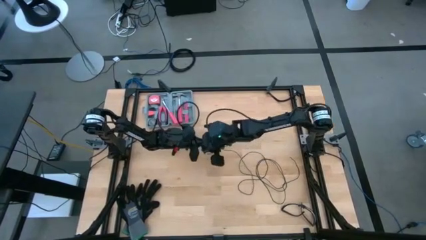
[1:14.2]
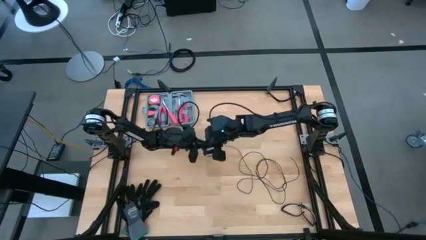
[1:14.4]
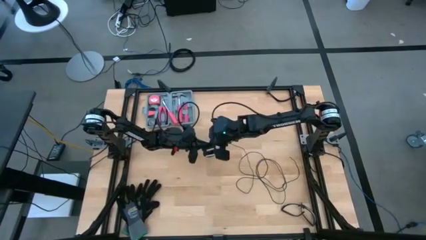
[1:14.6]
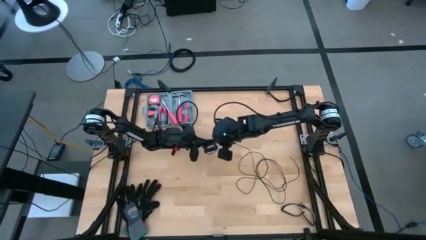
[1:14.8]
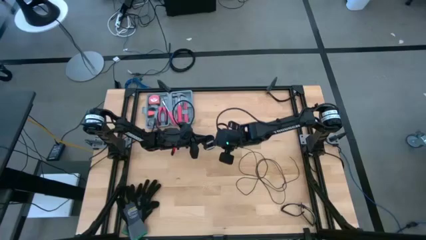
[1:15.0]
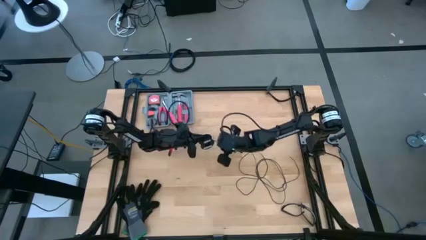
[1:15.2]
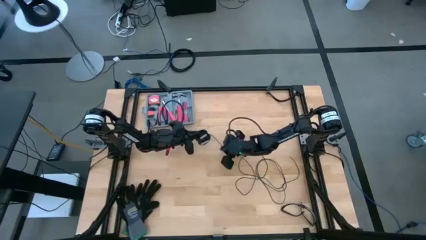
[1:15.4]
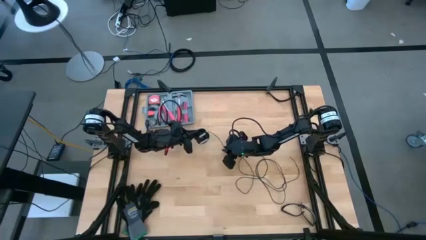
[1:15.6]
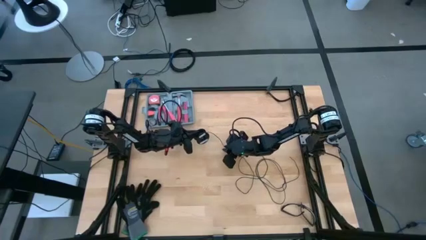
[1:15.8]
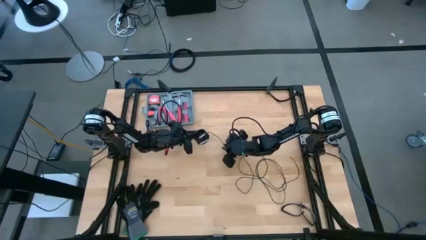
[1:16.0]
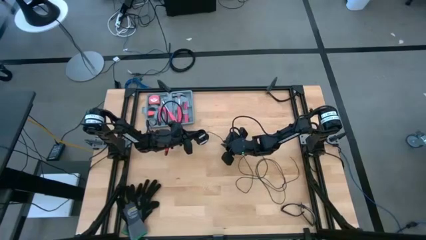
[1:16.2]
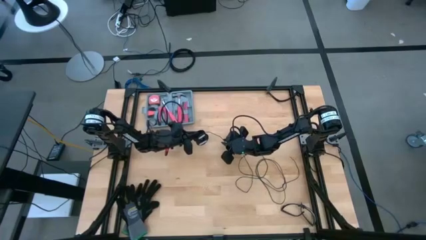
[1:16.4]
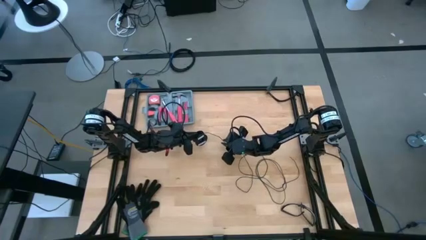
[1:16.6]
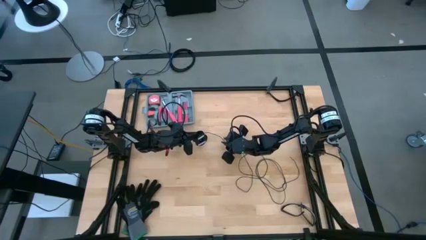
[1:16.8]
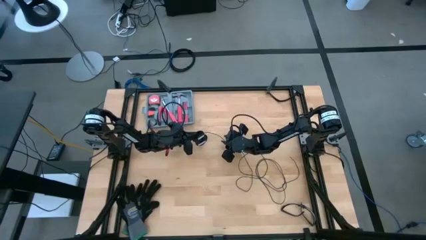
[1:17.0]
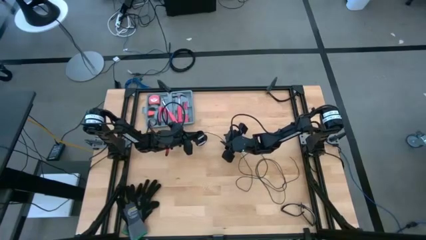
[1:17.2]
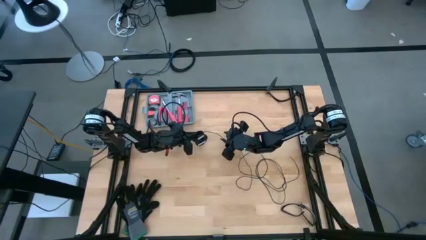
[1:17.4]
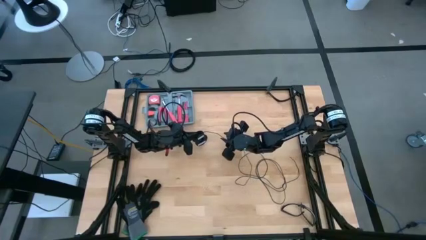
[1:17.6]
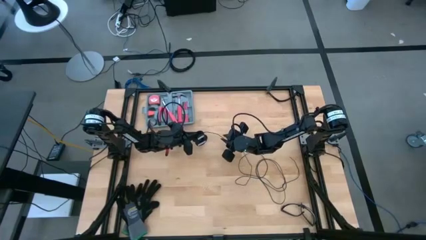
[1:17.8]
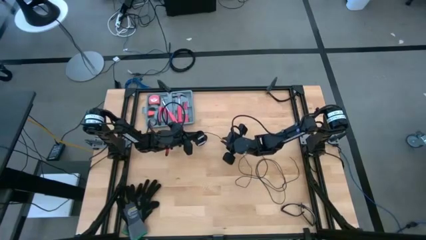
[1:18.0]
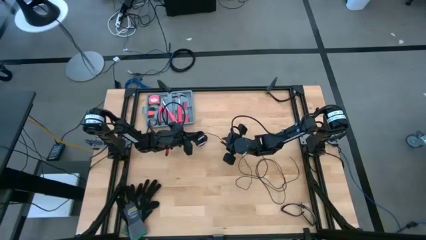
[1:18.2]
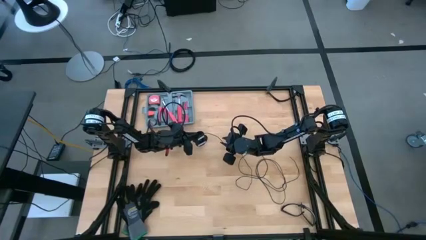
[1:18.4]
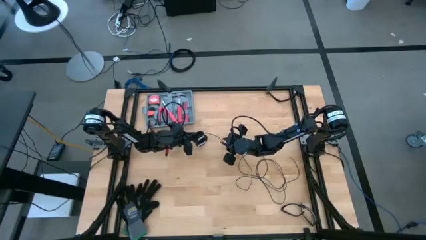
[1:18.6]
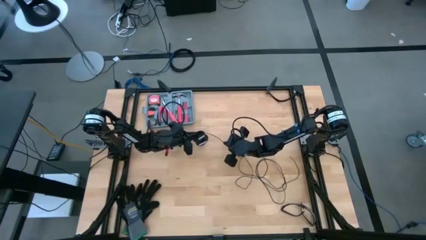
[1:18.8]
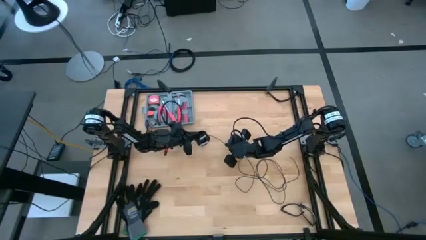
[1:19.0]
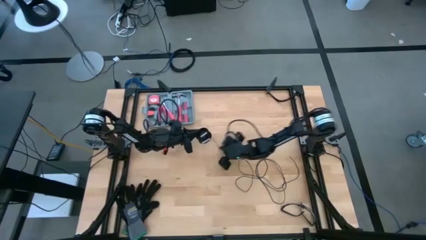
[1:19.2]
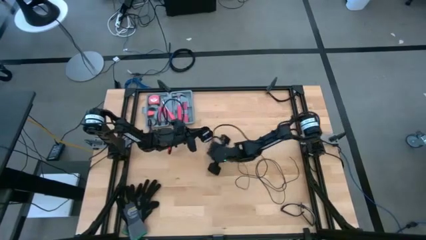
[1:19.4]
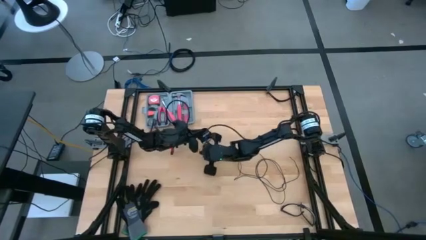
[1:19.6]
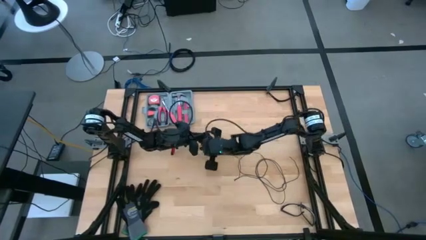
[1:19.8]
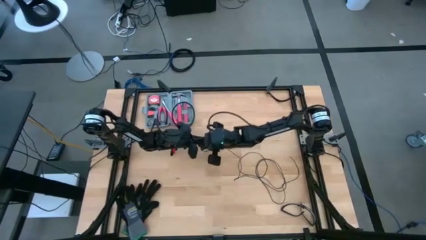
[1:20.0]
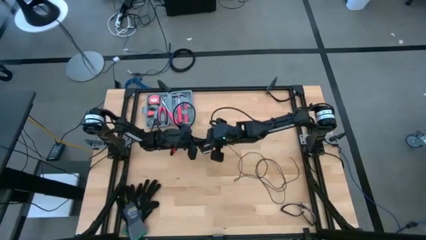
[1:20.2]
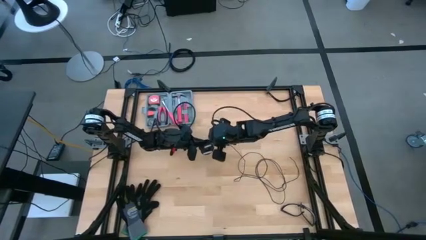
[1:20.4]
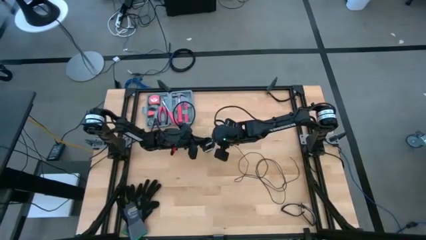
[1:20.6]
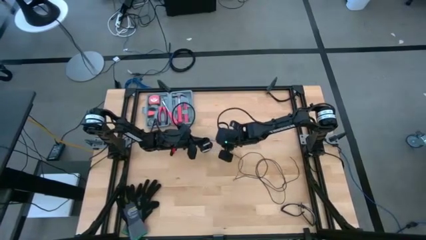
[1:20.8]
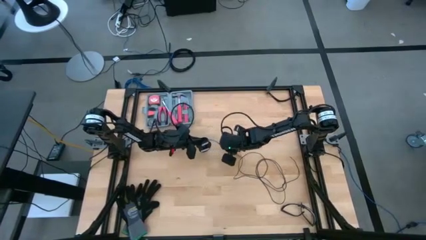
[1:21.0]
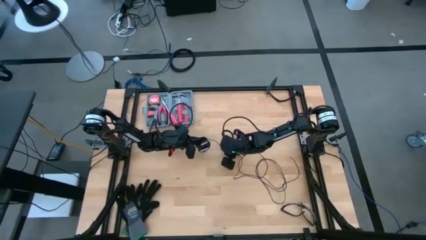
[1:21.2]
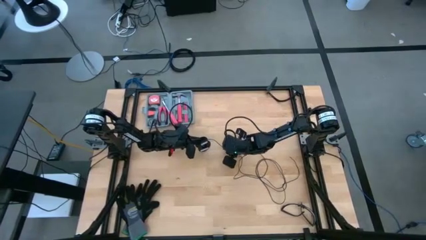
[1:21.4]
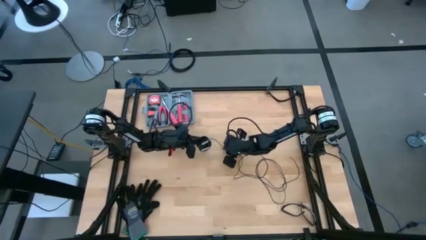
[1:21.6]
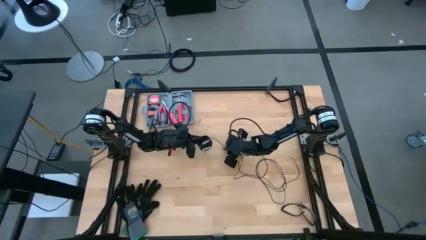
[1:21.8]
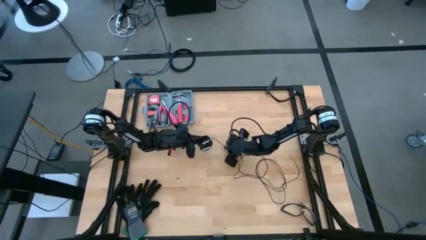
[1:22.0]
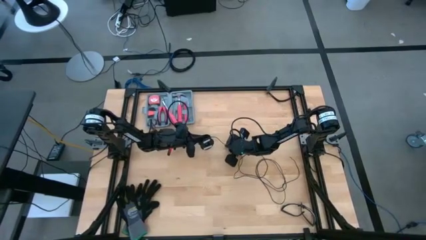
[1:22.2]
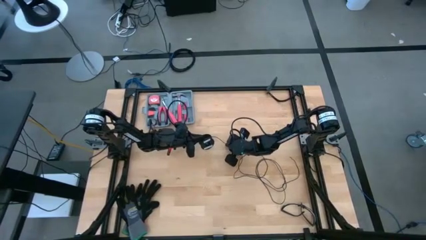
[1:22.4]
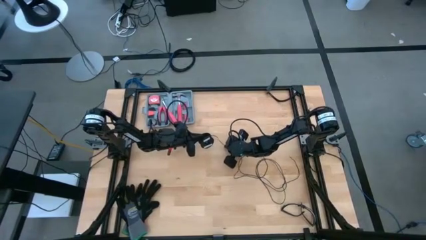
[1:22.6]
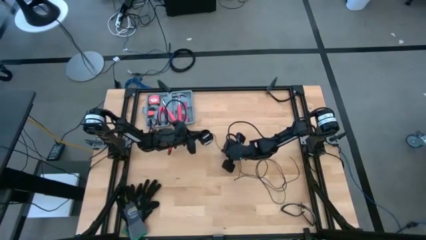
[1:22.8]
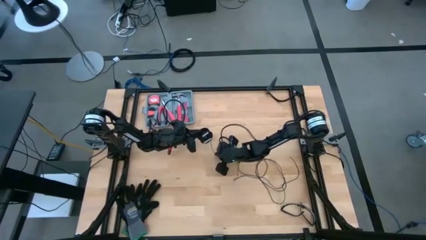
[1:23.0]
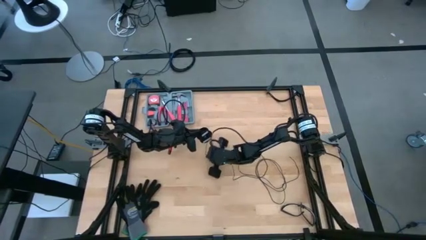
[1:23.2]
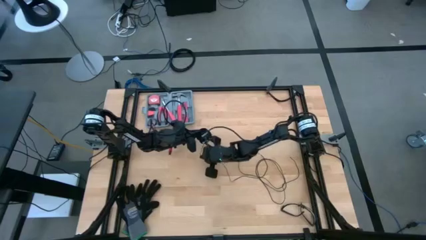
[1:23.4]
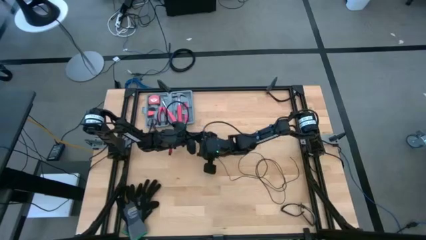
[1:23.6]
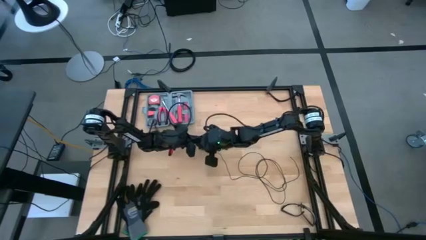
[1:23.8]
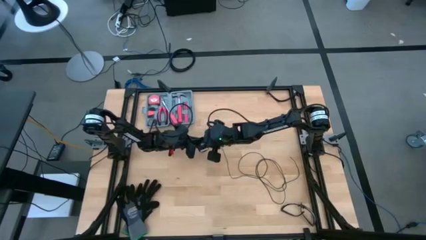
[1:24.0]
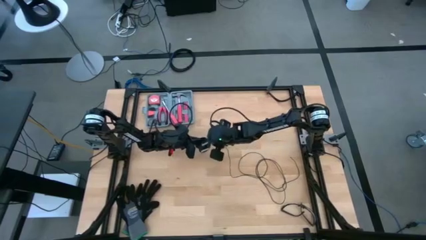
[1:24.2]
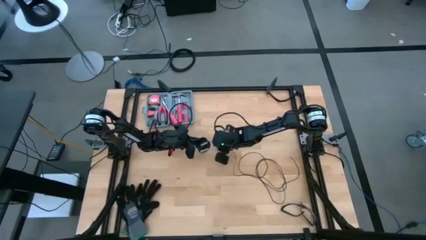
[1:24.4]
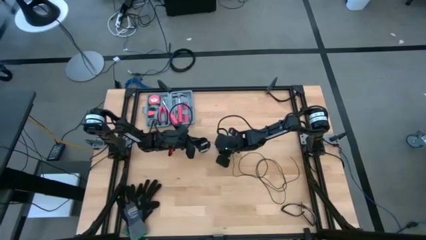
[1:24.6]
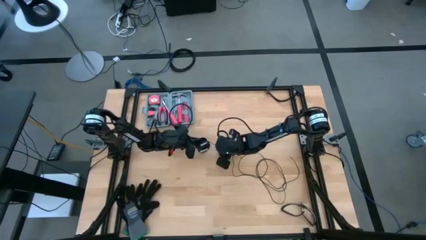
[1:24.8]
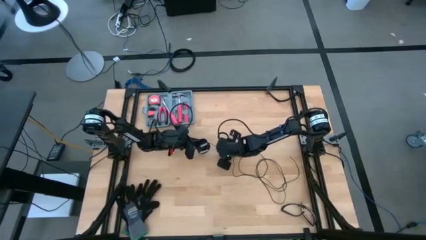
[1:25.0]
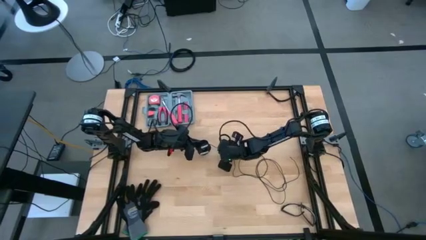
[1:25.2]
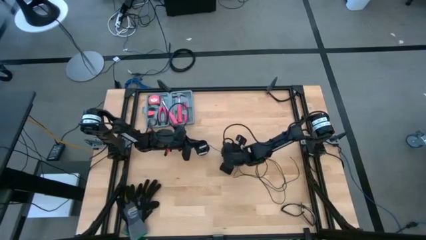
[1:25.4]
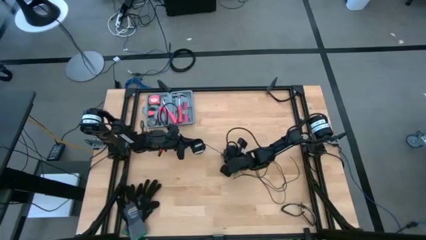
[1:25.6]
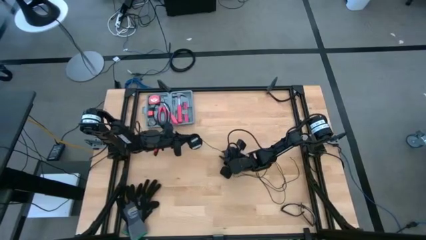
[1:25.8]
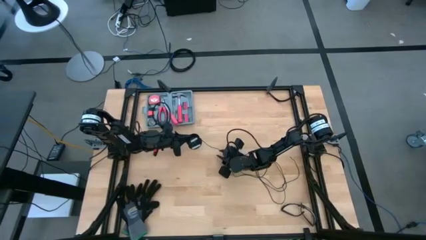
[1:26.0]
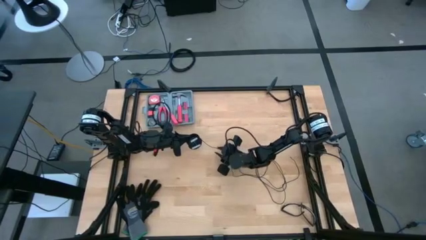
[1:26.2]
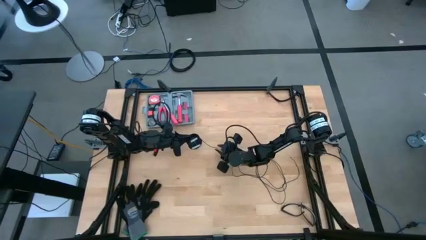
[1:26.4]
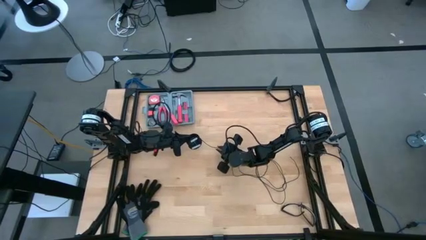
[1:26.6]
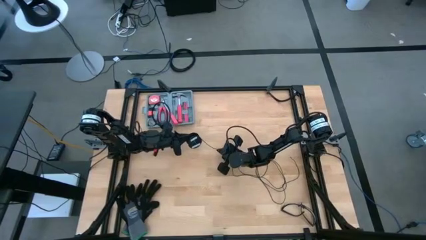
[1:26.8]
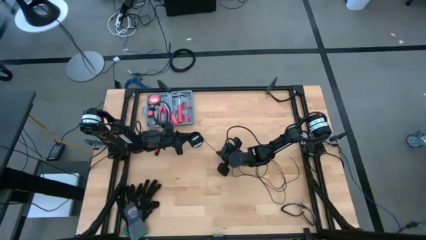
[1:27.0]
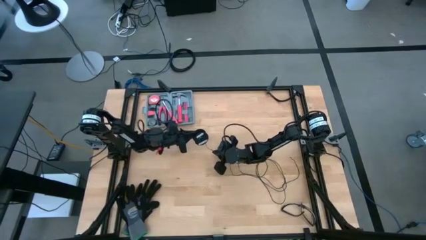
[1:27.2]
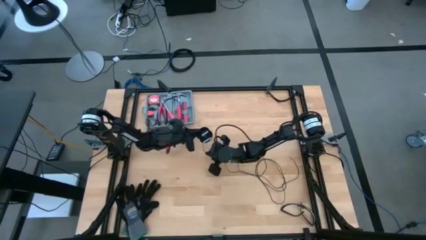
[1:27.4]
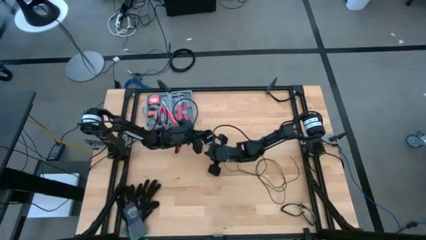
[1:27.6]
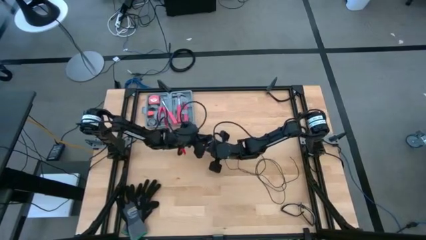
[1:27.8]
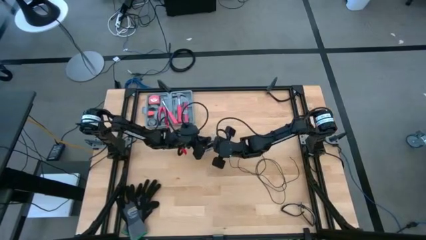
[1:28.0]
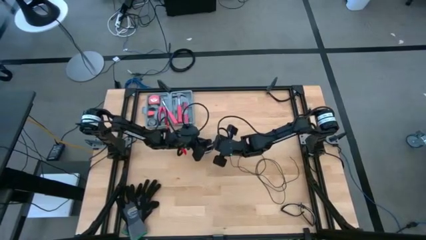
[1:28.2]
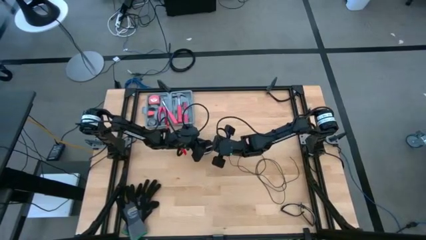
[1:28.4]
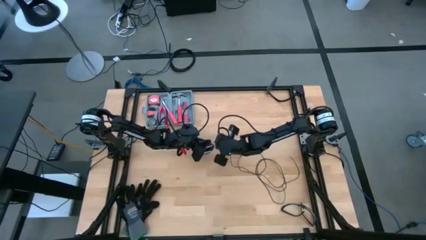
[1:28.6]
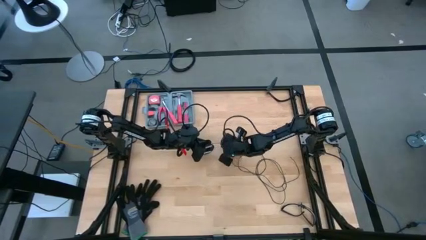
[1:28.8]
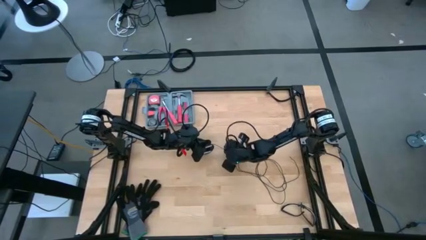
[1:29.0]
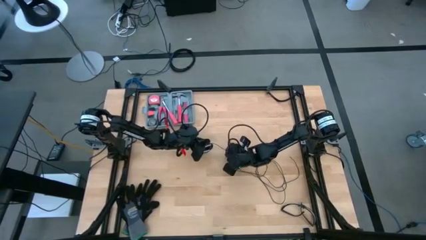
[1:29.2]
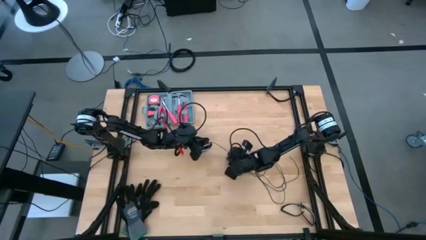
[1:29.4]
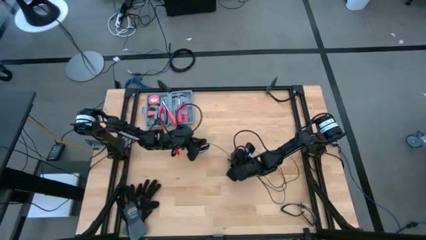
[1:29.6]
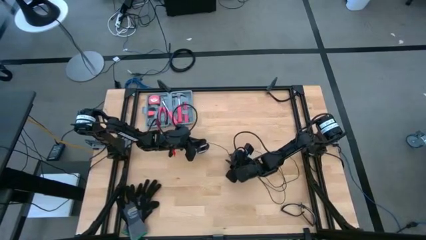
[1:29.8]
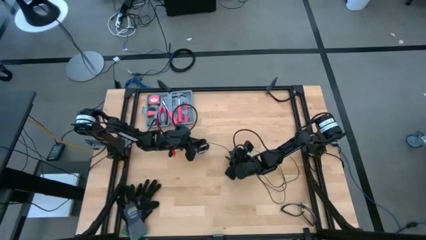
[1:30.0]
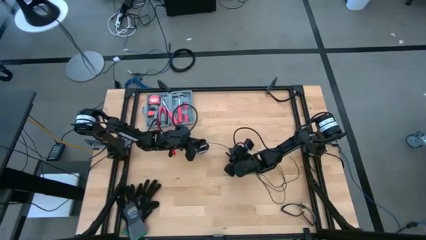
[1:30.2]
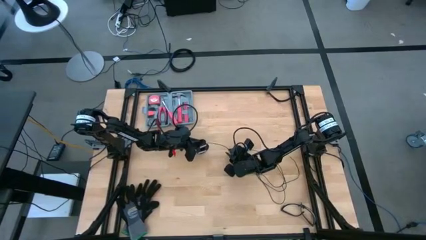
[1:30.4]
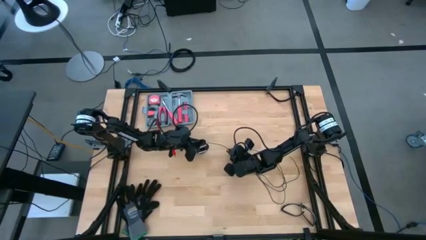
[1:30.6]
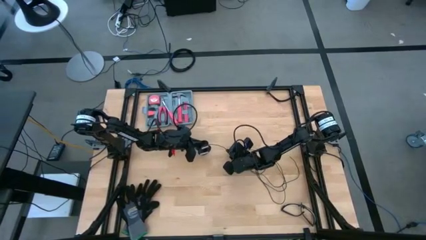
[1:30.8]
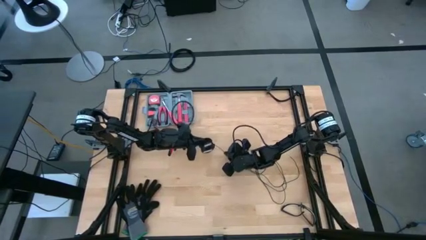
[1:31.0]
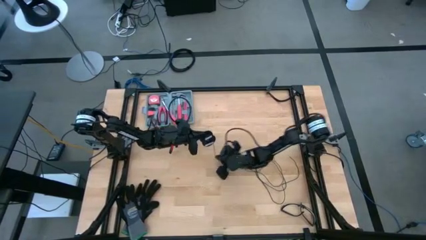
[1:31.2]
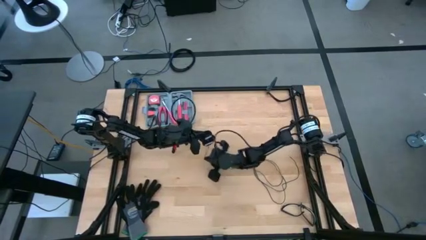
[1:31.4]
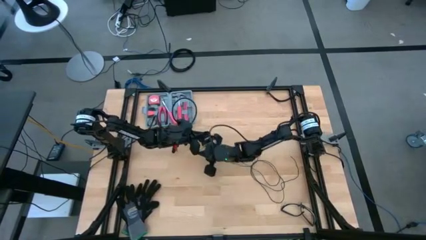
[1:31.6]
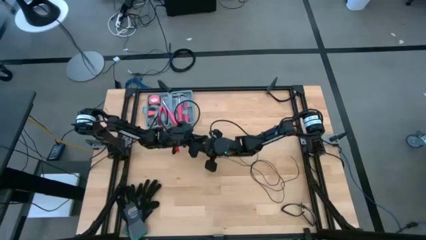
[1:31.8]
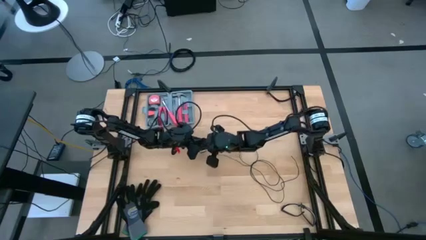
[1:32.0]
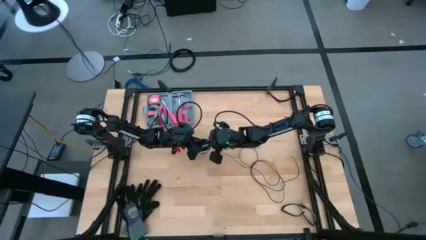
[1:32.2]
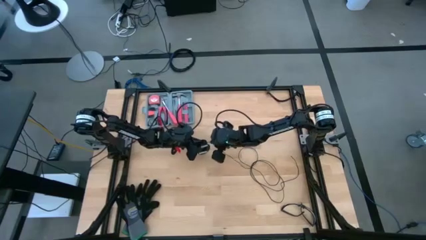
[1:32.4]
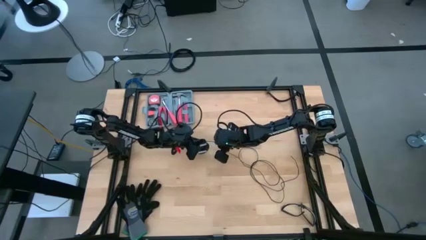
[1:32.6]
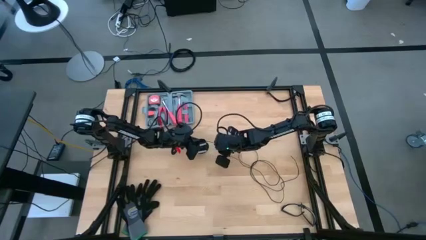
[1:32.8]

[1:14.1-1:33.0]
Task: Coil cords
Coil the black wire onto the spool
